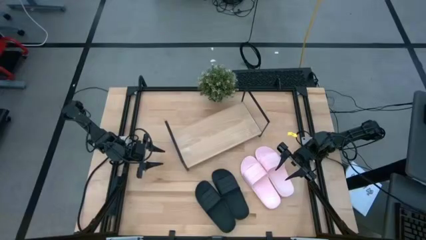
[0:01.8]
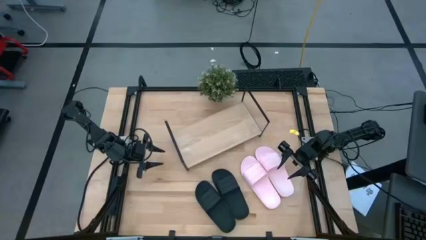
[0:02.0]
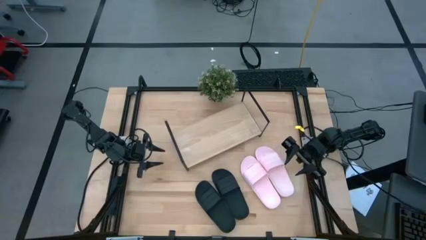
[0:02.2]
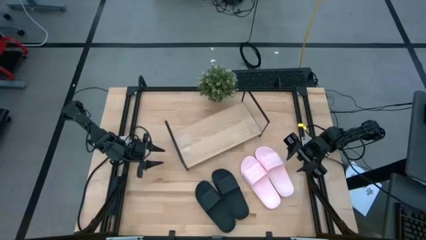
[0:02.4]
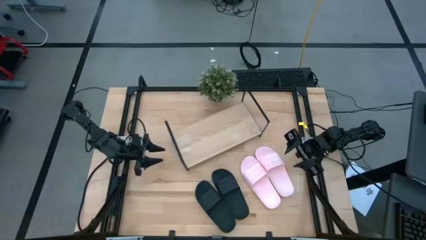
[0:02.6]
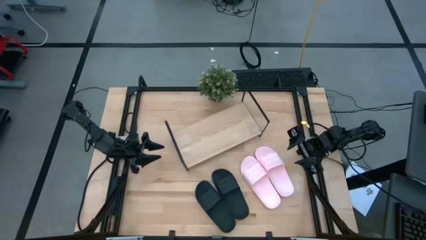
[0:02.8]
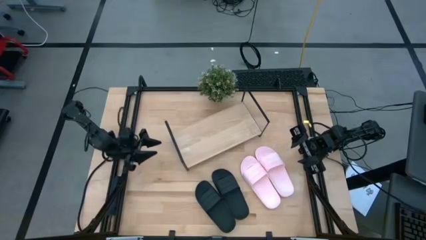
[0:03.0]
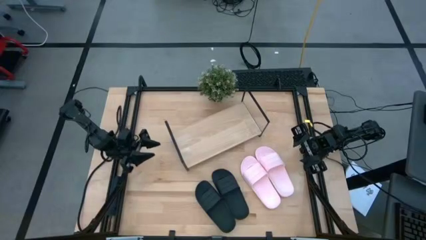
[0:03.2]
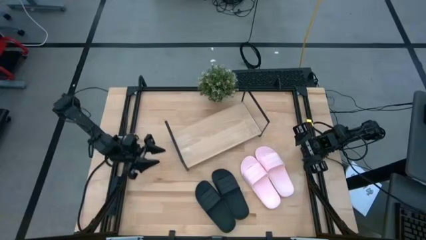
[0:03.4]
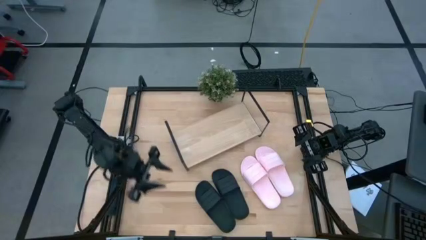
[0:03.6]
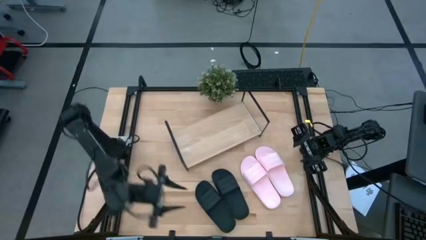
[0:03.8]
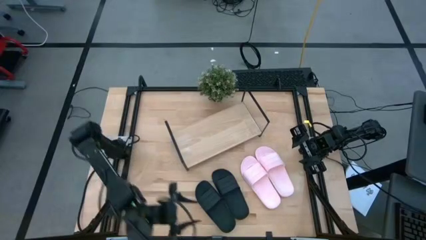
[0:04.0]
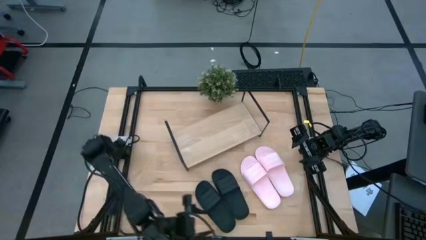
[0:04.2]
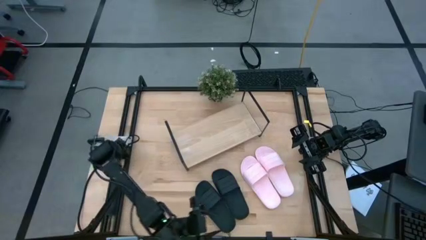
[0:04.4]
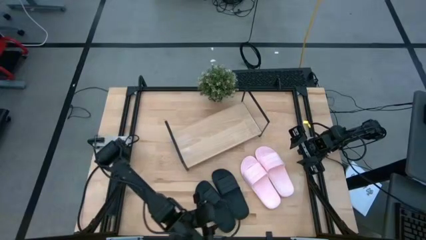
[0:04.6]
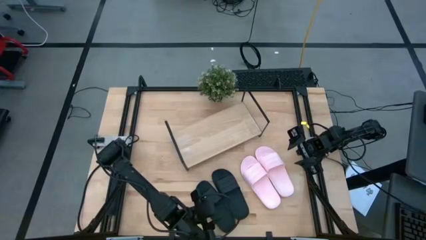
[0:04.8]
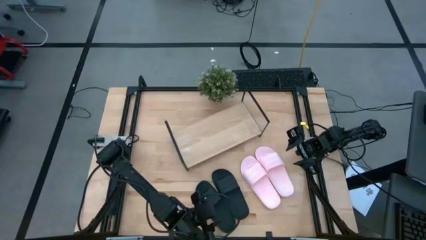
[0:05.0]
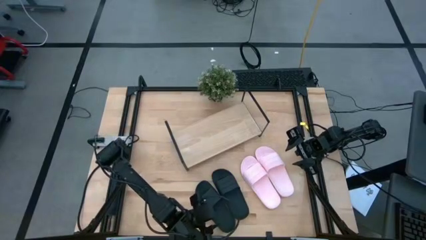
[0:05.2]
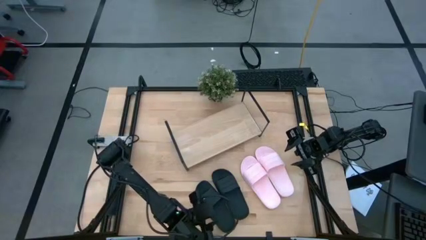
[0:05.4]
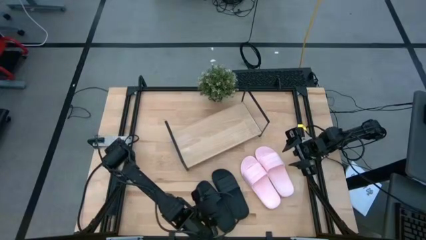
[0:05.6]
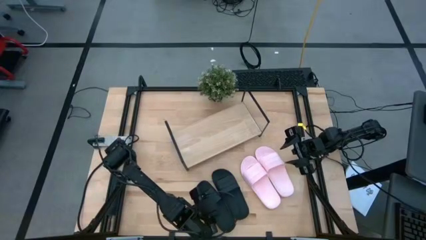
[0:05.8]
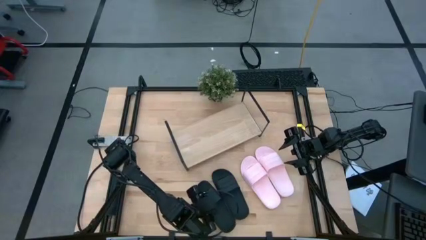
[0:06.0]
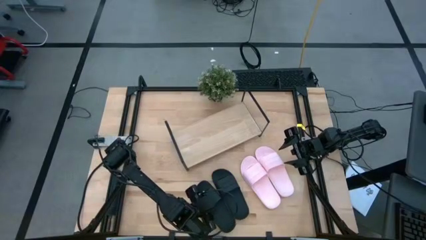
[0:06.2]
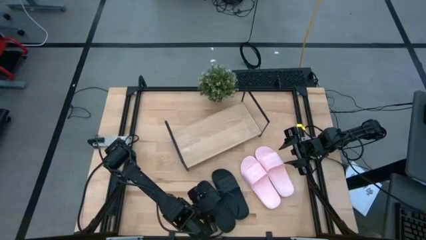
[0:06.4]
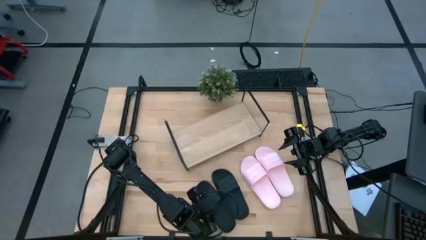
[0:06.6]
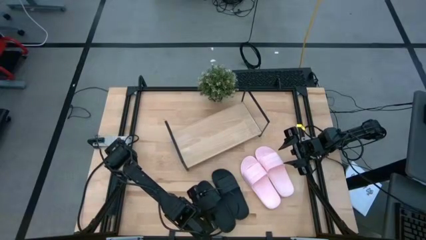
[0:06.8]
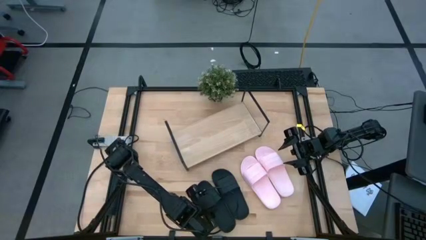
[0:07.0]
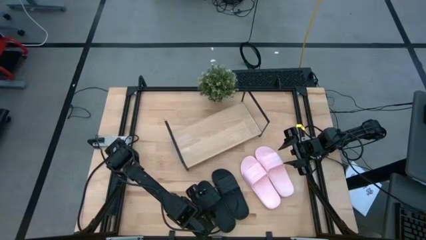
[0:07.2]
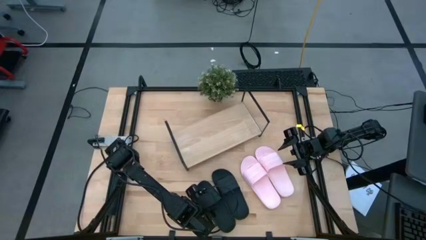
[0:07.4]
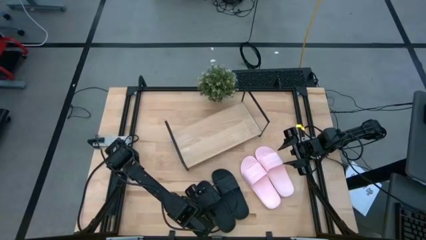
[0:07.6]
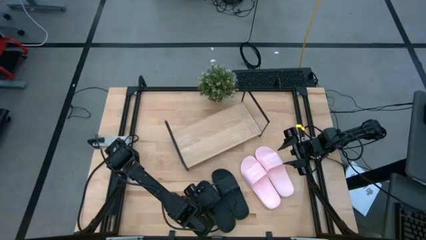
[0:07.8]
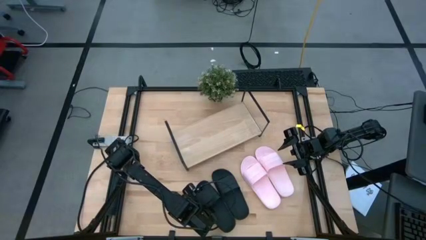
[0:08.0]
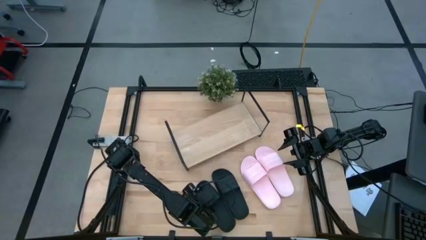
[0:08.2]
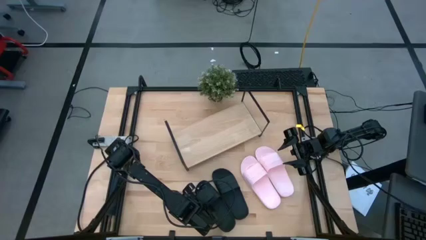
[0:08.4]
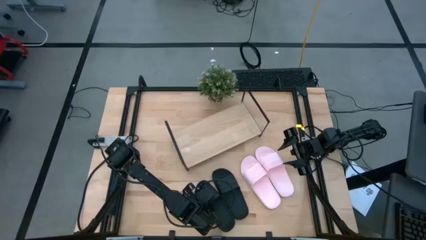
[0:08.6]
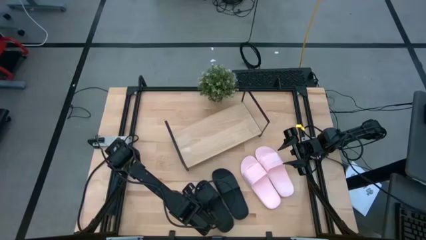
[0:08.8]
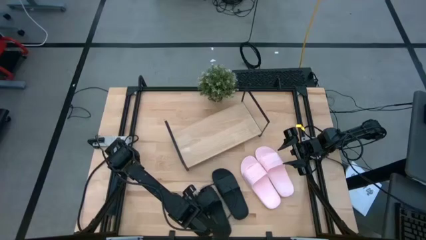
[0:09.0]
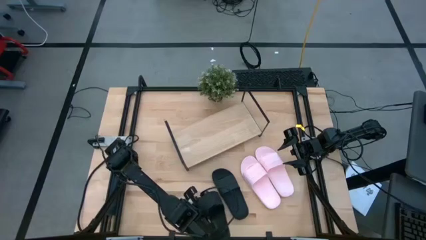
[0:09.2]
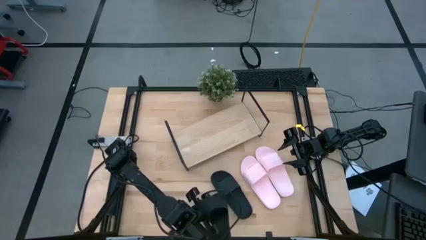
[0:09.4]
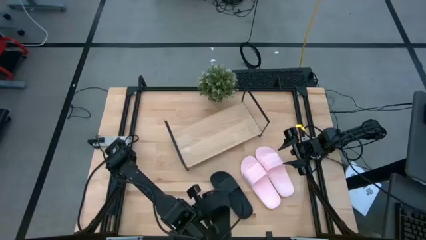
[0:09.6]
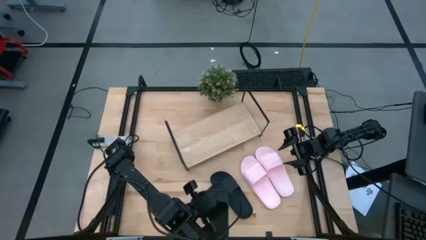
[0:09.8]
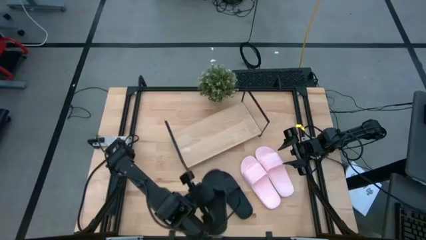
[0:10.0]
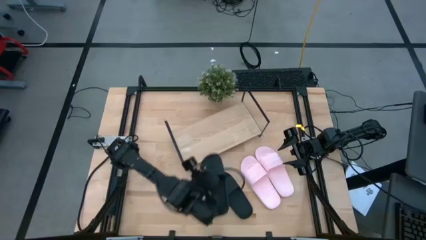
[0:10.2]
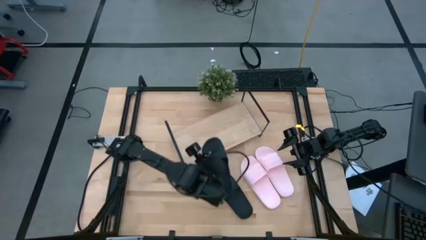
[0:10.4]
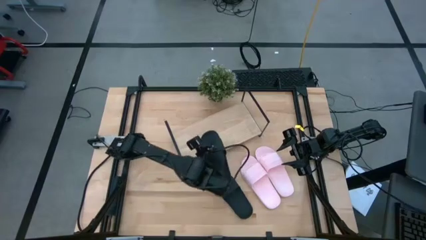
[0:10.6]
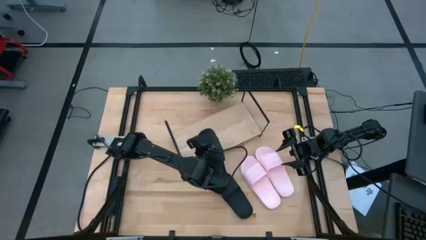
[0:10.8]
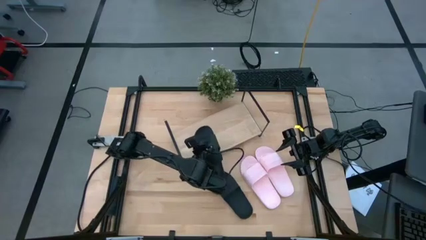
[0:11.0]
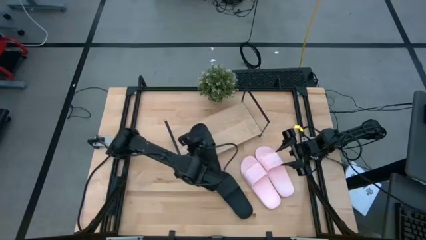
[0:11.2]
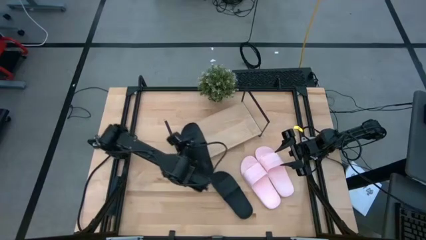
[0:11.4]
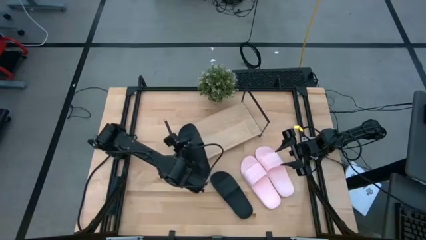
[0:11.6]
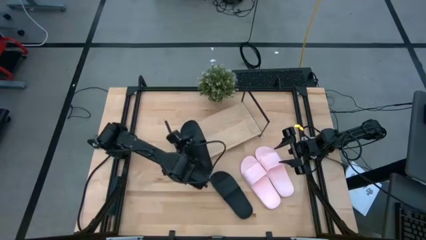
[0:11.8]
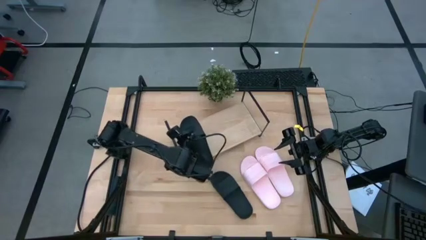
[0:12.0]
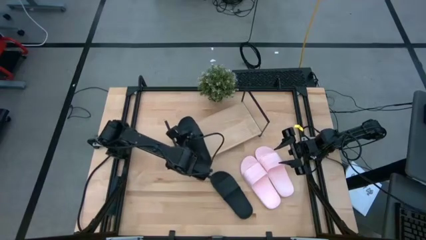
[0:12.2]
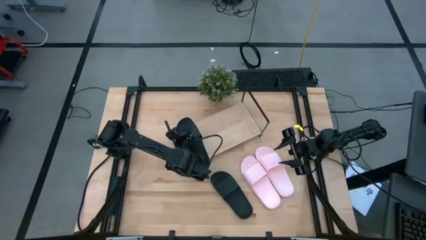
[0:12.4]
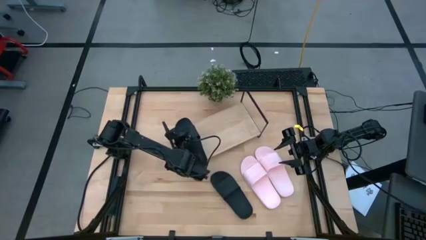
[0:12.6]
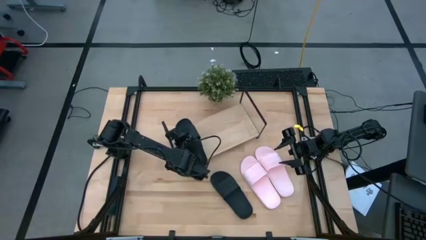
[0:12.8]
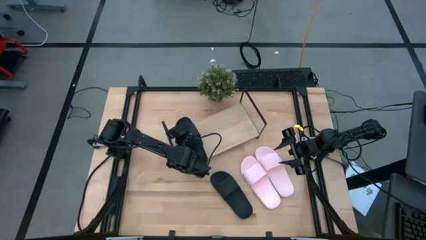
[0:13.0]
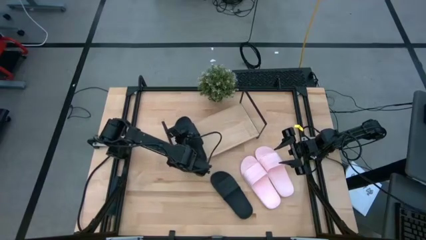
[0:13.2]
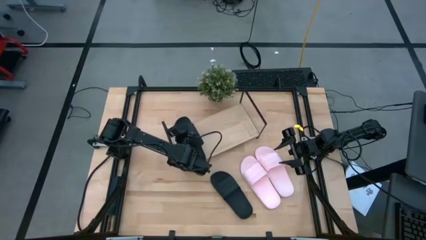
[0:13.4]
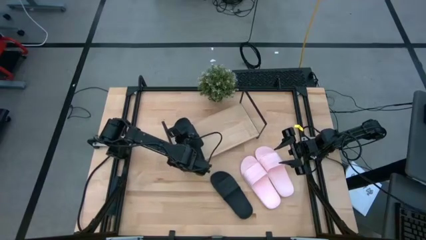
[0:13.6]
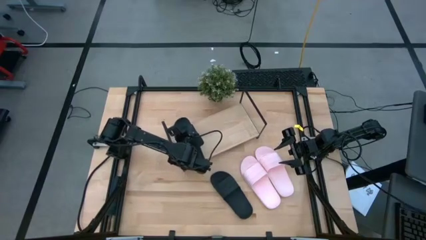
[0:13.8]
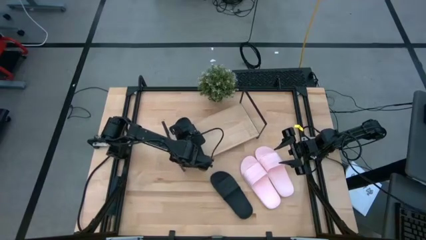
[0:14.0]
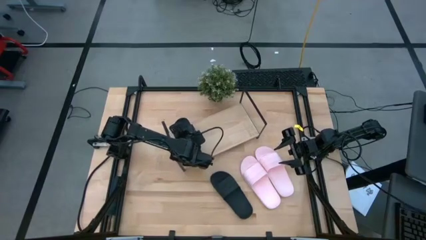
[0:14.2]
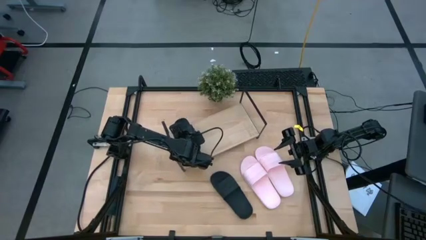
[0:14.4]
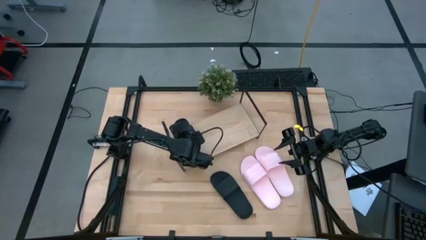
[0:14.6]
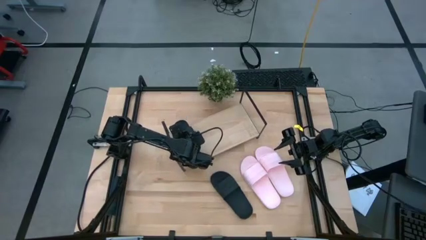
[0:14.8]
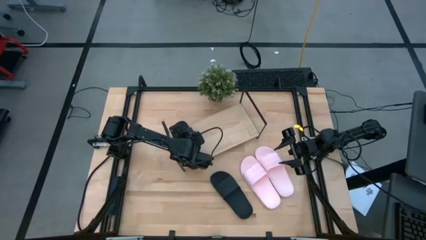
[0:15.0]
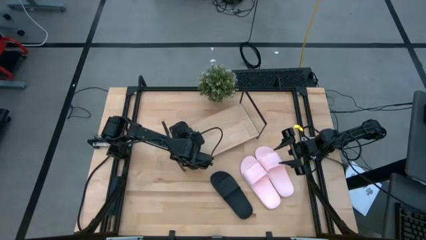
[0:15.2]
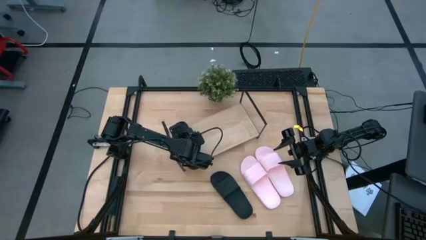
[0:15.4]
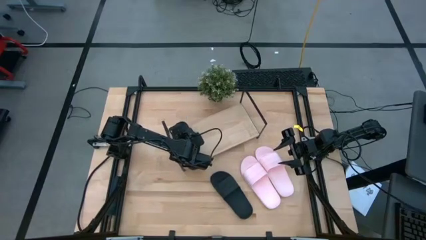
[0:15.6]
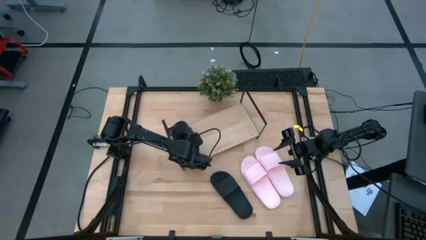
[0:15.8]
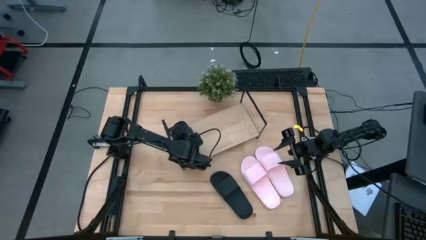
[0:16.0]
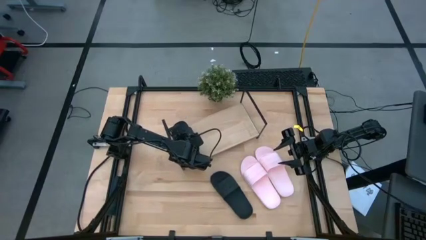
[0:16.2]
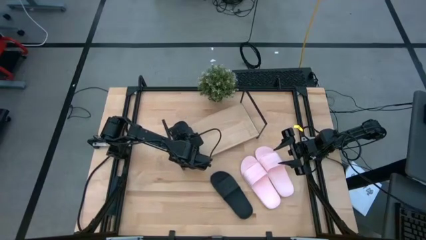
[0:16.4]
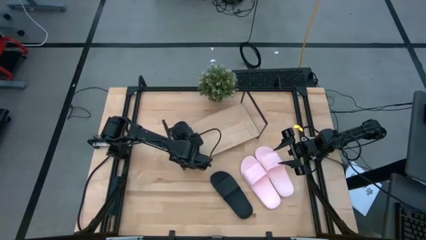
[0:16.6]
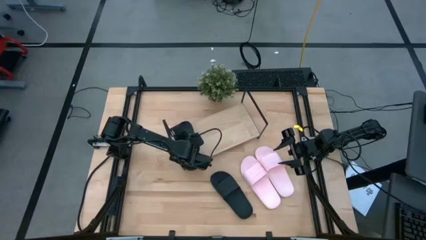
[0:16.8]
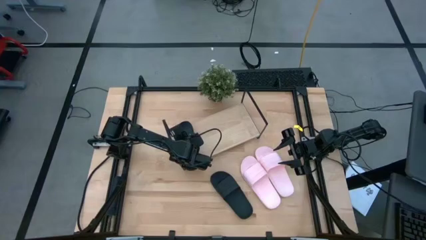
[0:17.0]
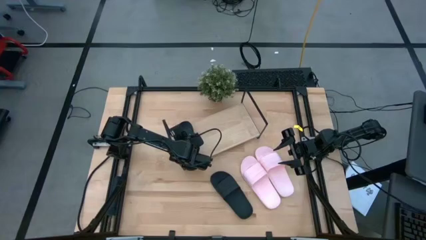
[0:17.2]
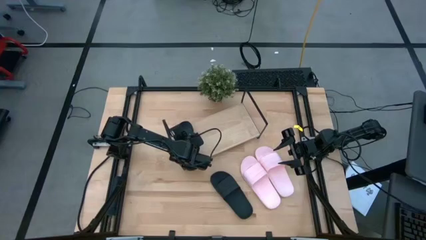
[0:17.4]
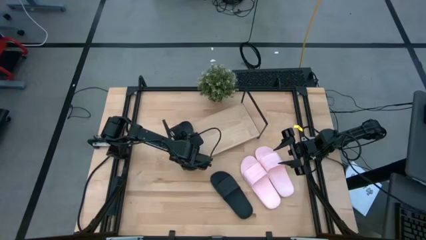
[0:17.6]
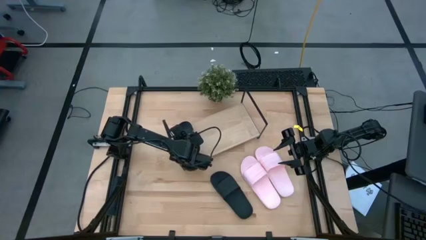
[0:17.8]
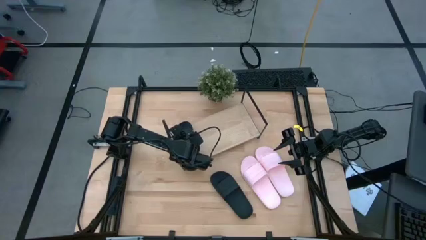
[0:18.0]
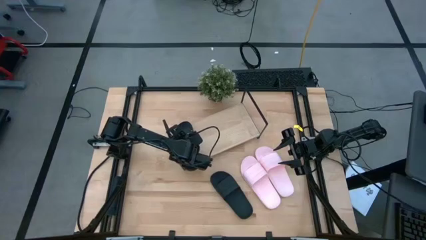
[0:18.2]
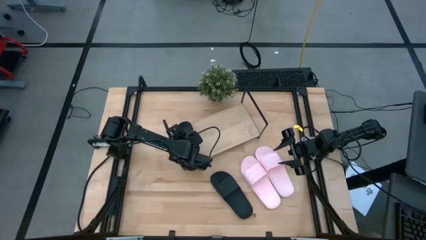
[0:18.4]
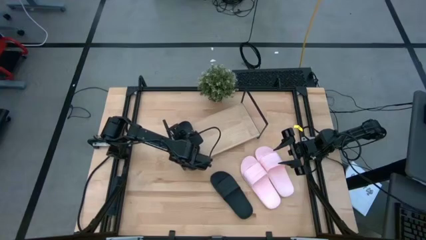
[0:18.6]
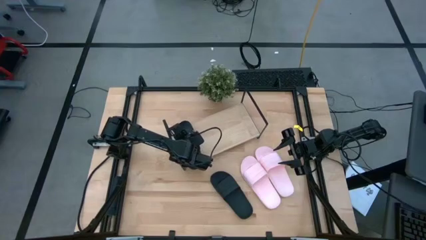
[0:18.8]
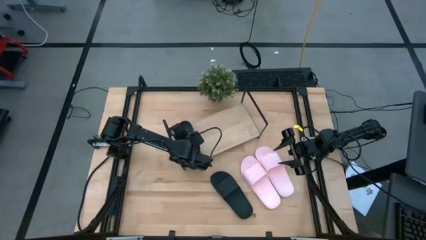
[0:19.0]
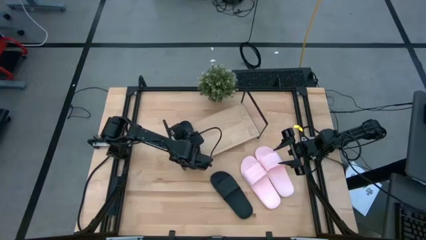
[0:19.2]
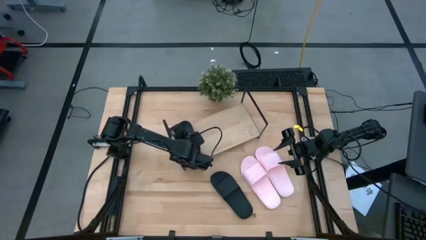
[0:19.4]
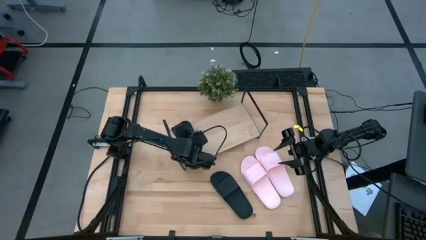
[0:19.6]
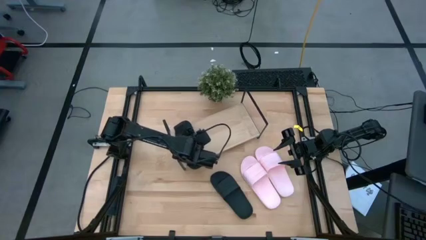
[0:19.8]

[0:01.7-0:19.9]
Task: Pick and place slides into the shelf
Put the left pair black slides on the shelf
